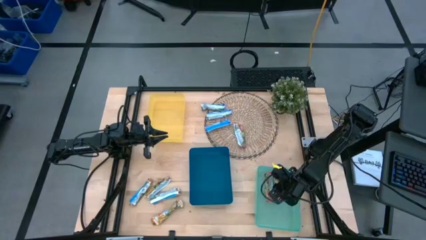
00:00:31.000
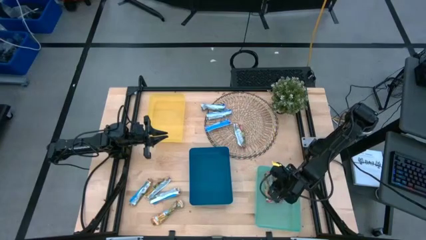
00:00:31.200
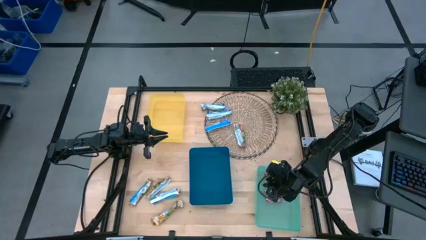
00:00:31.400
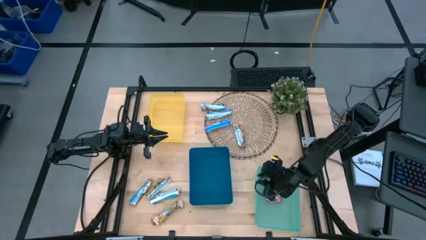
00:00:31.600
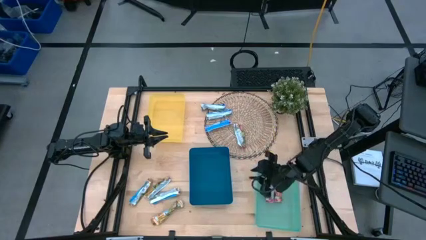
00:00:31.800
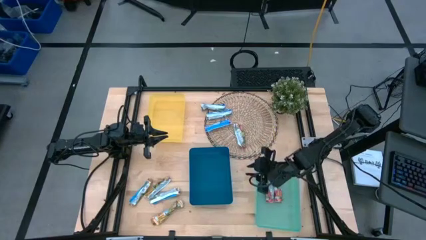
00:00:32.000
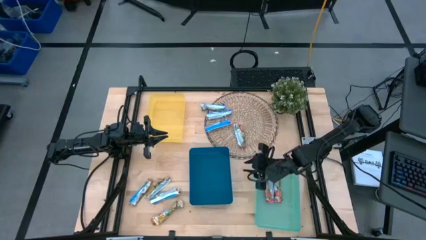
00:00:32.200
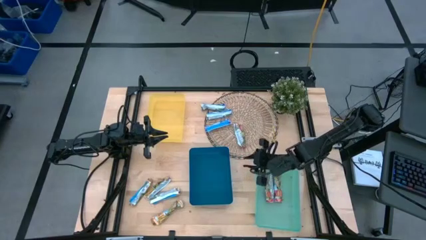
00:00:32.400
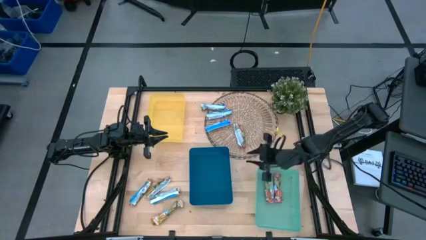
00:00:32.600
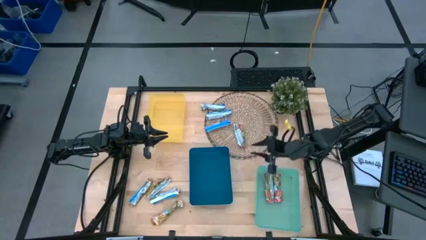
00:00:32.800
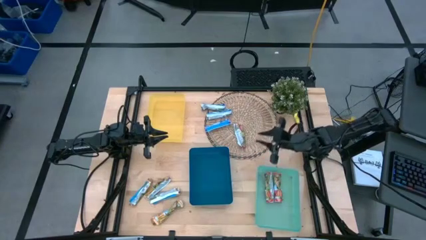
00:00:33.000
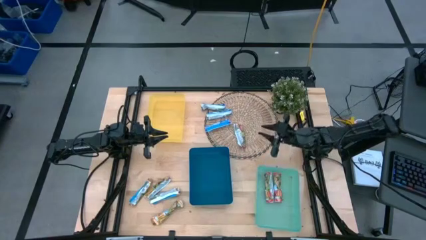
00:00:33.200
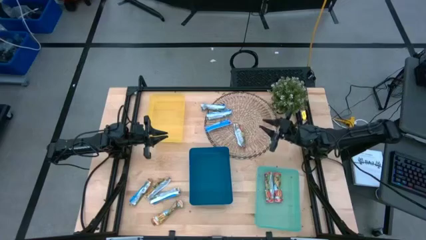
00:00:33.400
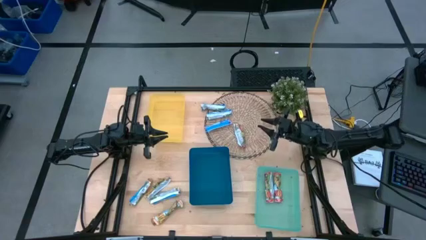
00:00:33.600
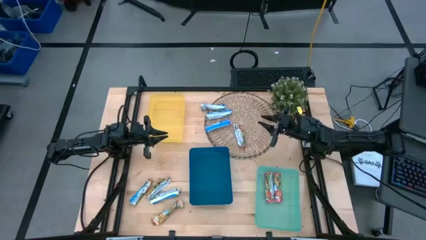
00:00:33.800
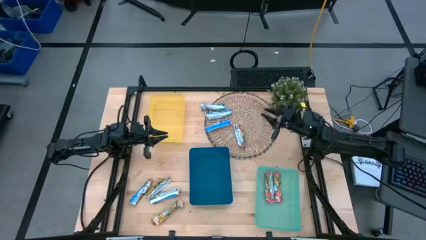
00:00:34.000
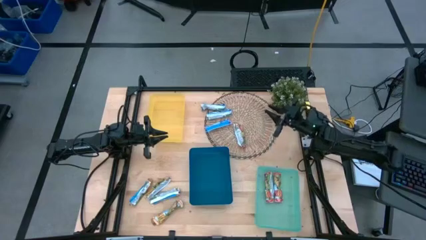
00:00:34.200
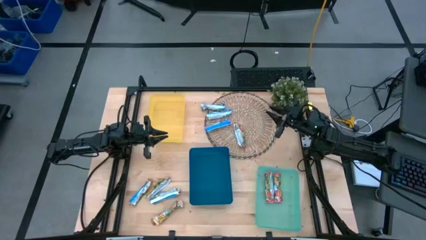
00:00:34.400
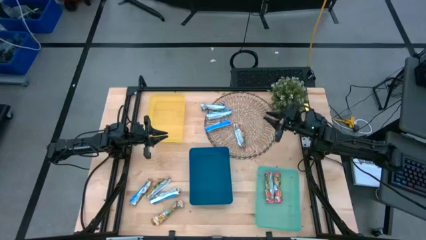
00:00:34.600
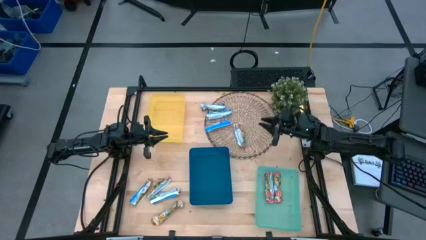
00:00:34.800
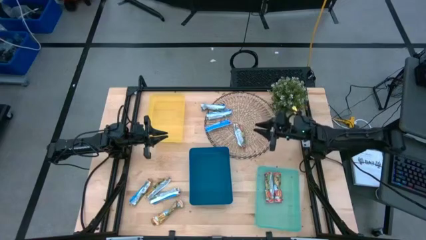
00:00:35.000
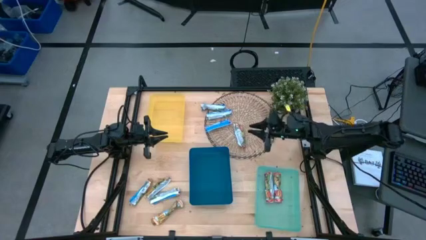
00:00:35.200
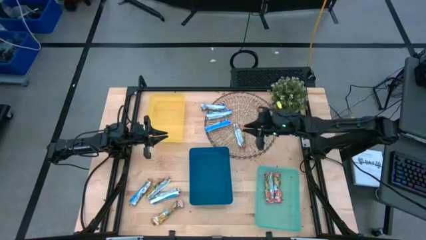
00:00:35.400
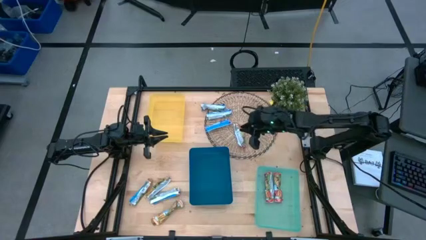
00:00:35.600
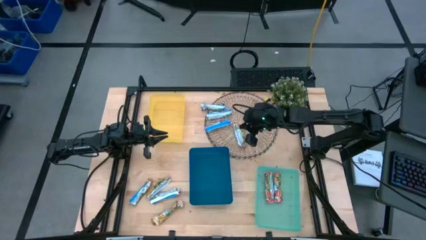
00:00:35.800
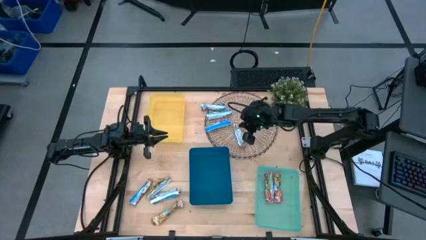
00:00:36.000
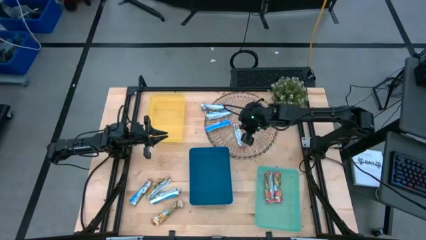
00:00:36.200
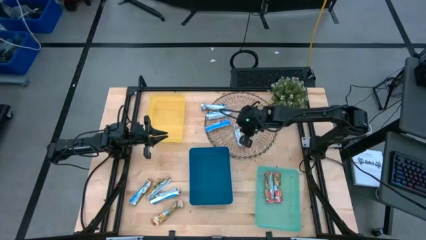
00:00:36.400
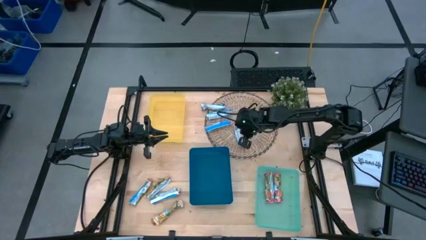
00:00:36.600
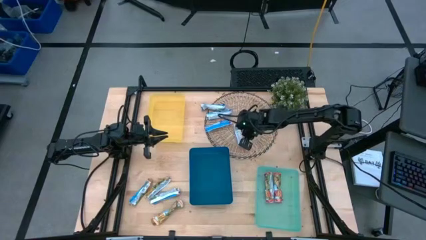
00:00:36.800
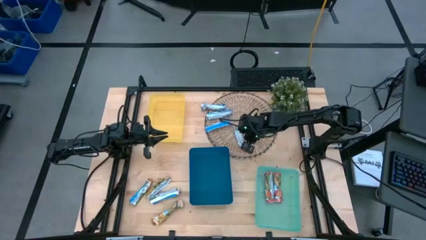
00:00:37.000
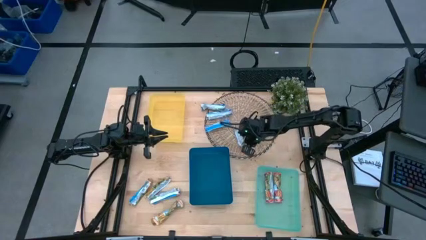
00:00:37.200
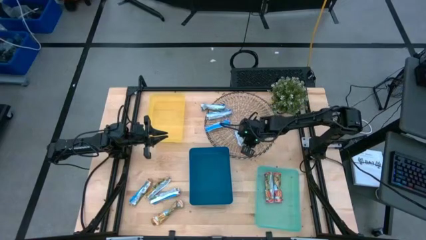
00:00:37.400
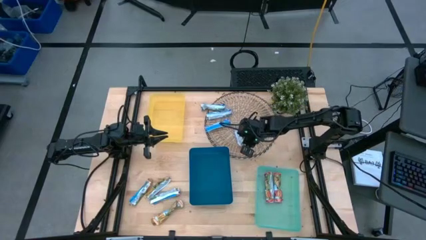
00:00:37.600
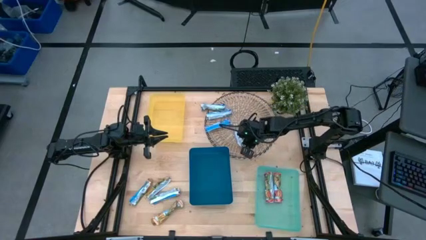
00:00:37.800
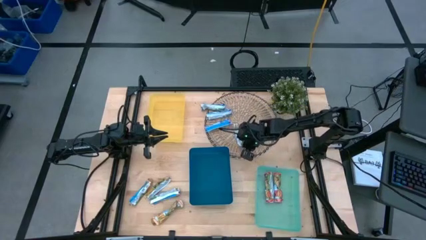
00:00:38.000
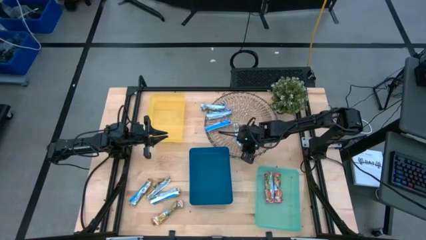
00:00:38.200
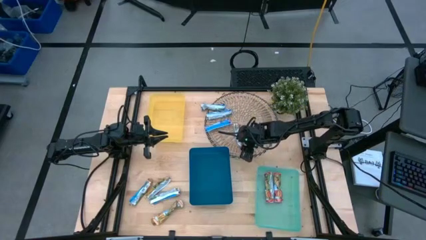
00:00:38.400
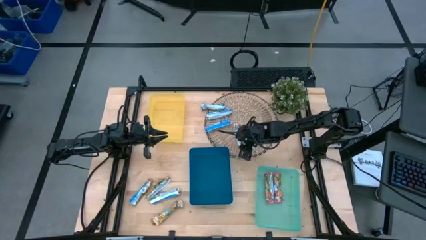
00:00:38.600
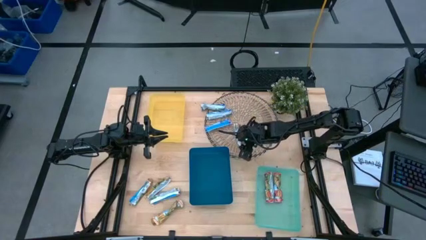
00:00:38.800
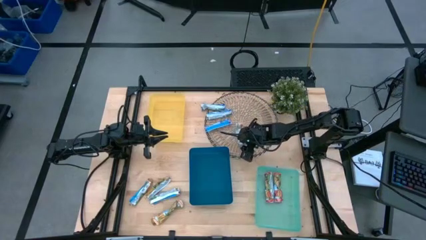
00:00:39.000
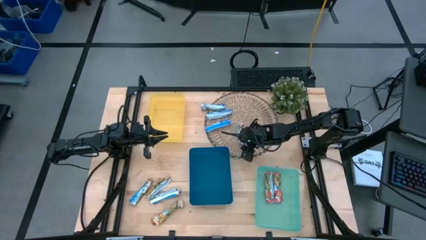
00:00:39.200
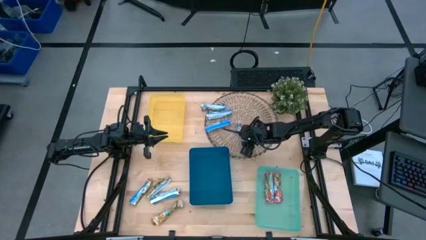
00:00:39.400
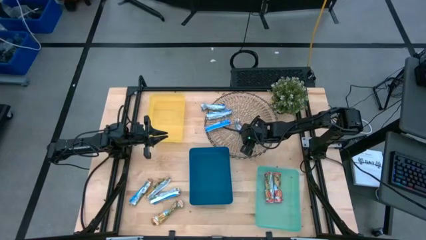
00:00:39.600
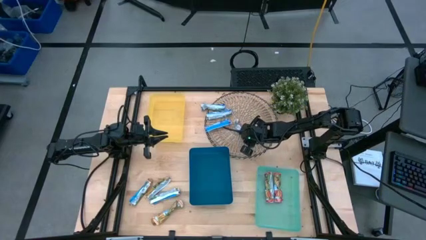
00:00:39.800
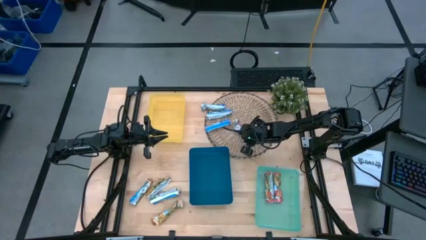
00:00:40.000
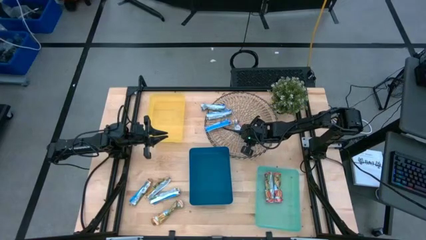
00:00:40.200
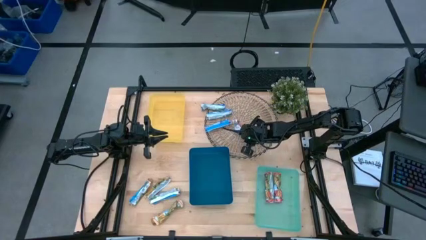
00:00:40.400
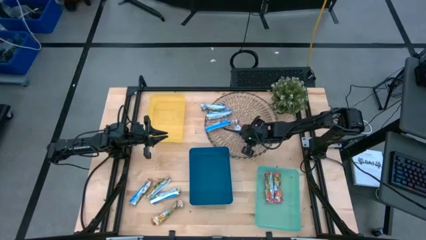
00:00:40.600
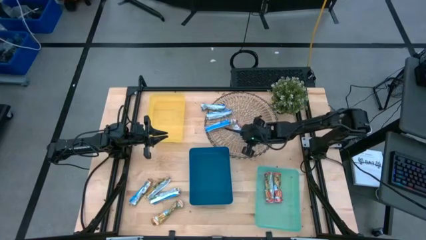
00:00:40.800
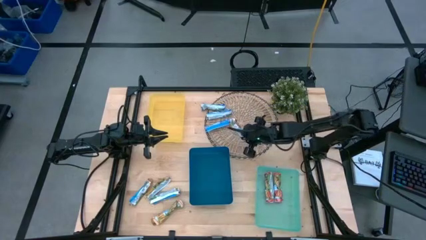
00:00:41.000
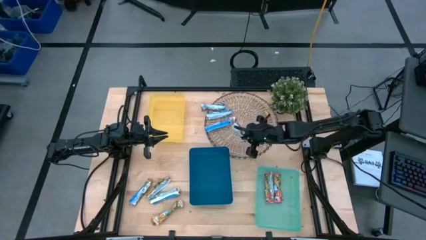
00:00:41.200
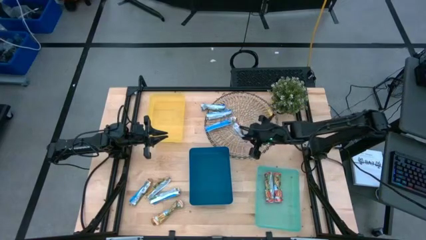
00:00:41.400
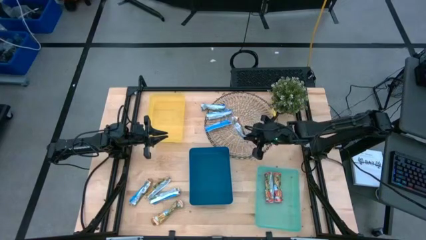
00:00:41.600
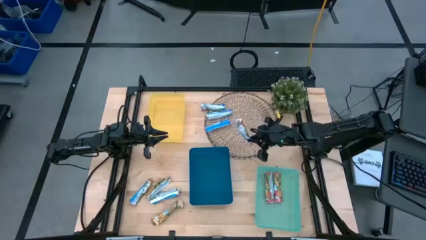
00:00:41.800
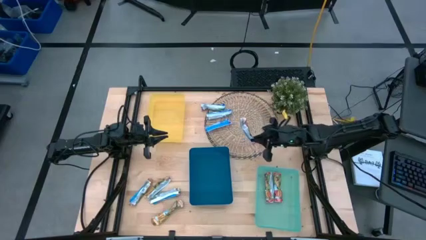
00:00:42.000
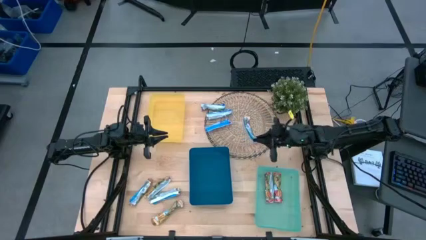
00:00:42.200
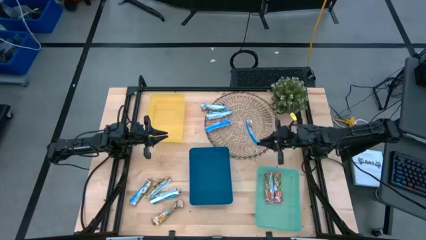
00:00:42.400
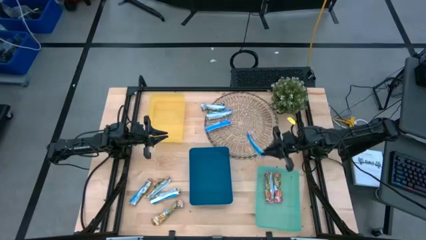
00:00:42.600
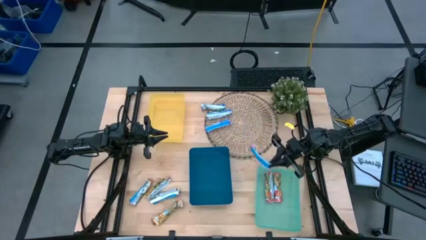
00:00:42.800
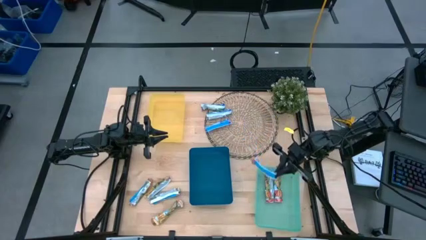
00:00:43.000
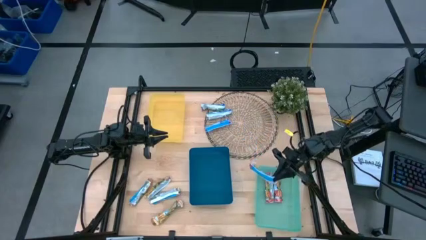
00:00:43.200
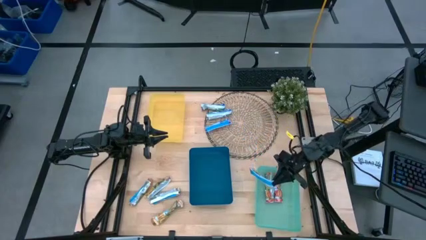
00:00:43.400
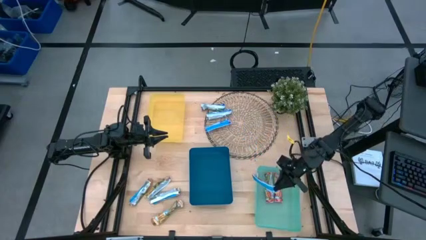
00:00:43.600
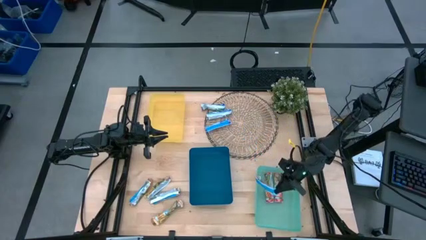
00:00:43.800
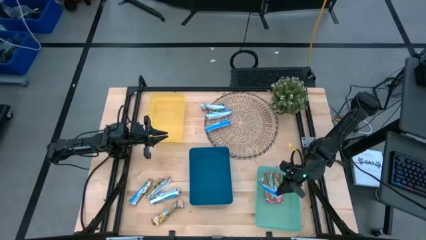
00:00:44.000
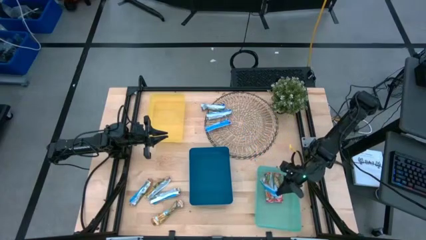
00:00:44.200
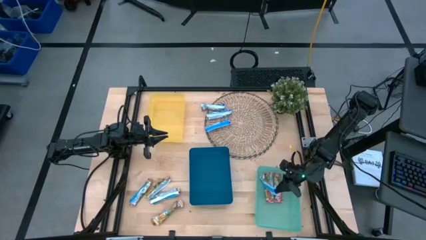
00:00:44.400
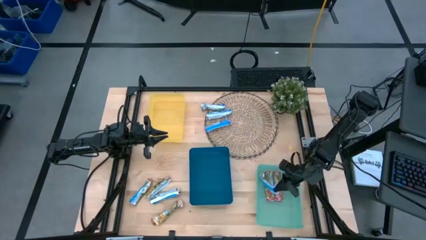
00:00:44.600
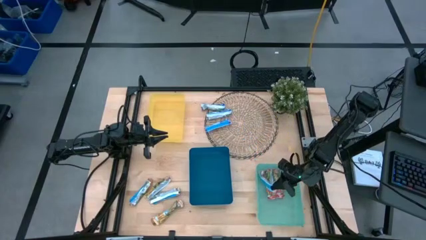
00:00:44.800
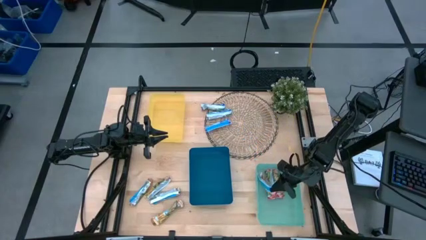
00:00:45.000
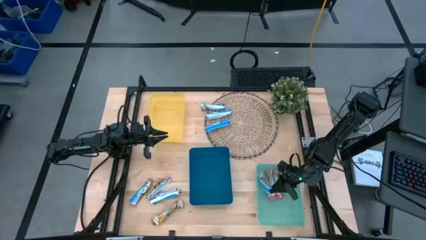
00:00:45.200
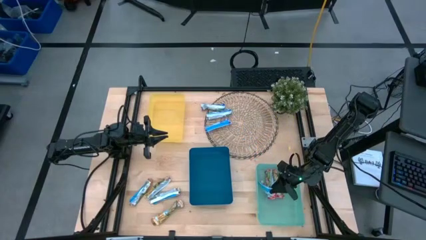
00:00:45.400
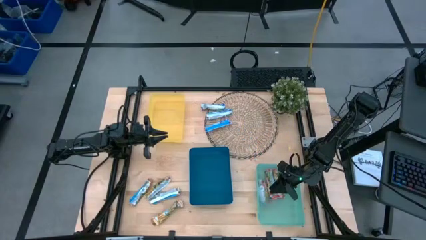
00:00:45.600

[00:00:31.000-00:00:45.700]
Task: Pick and place Granola Bars by type
Put the red granola bar into the green bin

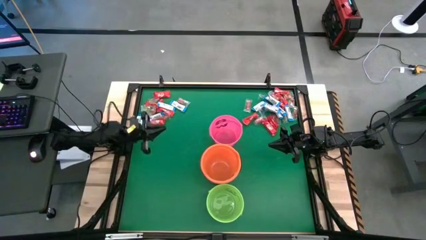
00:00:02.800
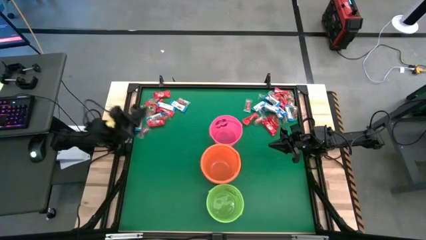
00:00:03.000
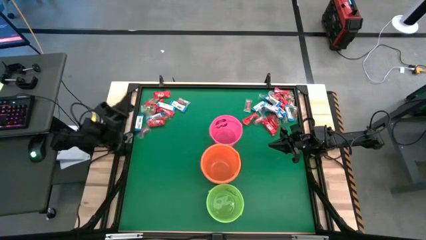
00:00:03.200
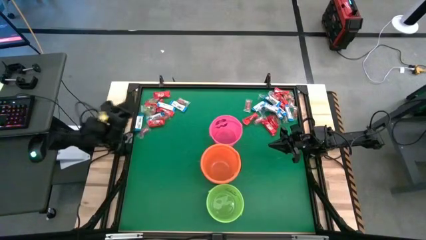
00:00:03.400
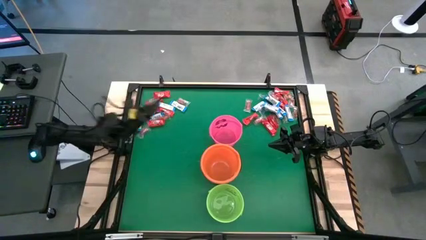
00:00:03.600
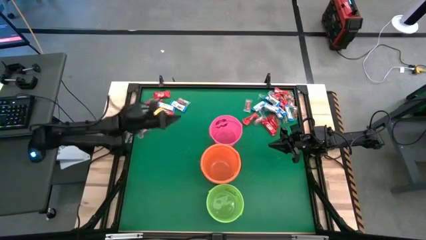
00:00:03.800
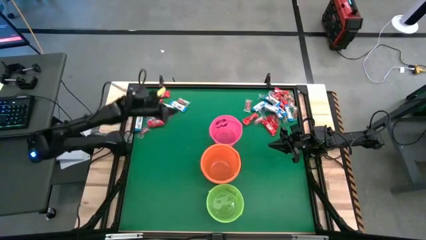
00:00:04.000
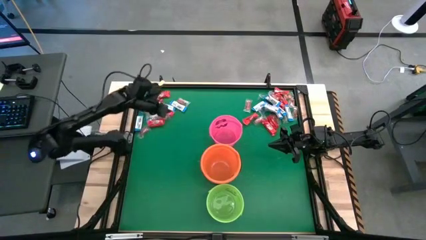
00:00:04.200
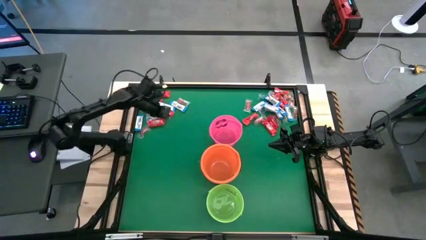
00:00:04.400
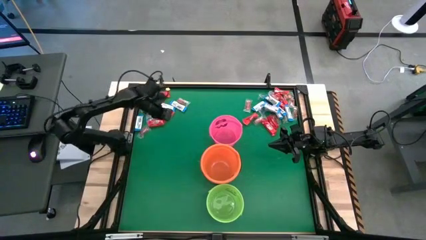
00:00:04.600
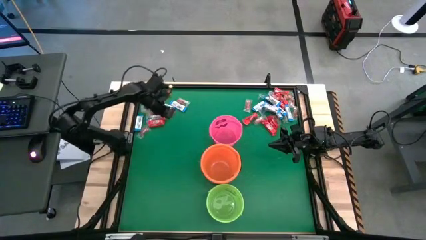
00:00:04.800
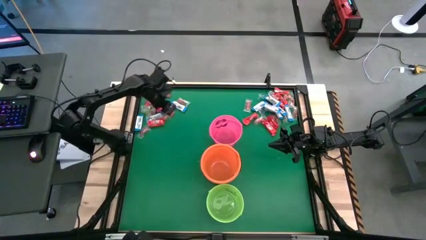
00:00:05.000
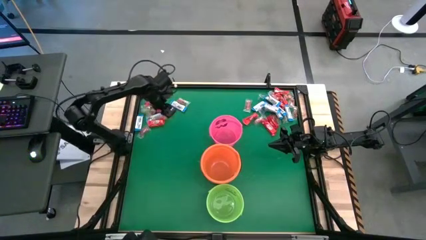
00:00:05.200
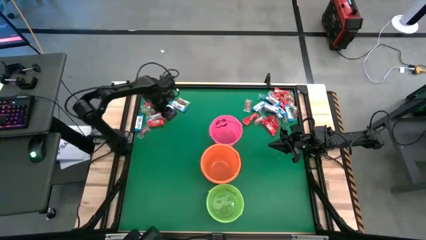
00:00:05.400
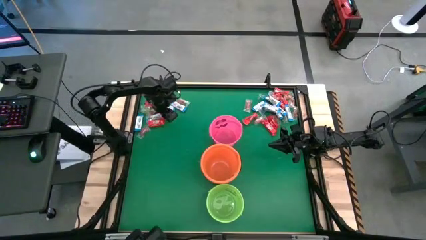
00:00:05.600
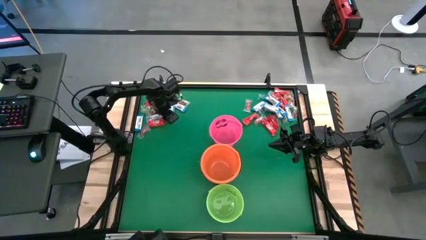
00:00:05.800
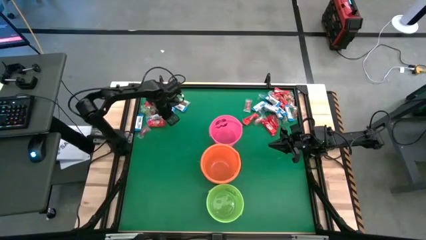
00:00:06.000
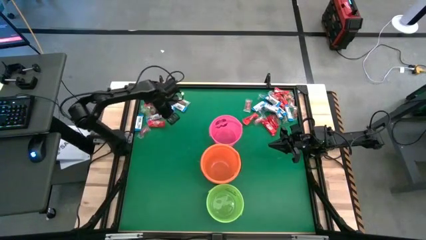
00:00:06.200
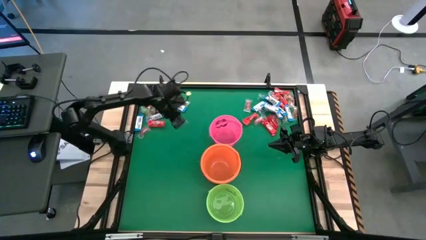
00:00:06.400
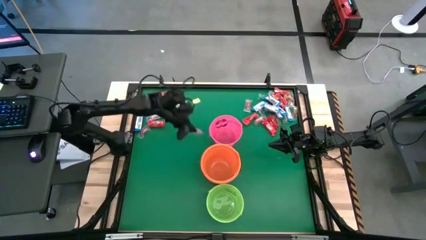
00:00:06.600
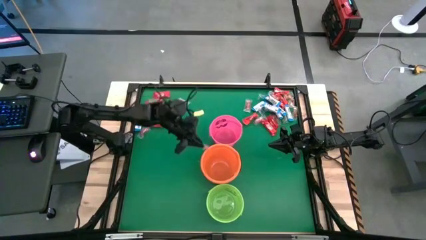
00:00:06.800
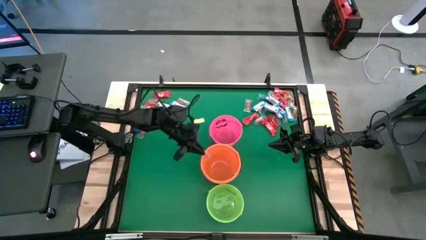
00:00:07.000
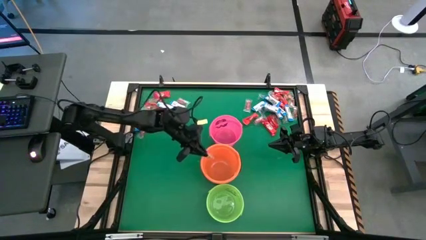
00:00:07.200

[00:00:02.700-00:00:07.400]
Task: Sort candy by brand, put in halloween buckets
Put the orange gummy into the orange bucket
